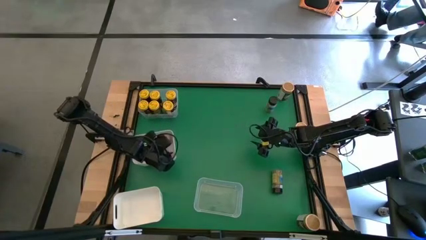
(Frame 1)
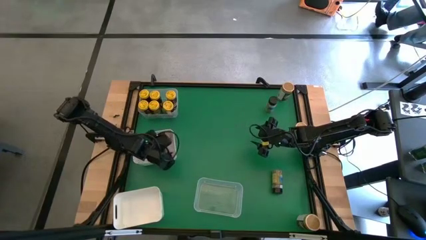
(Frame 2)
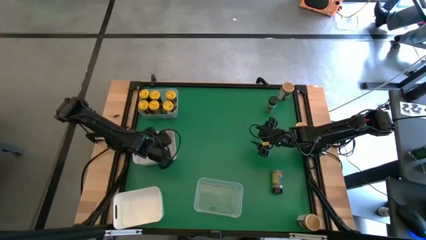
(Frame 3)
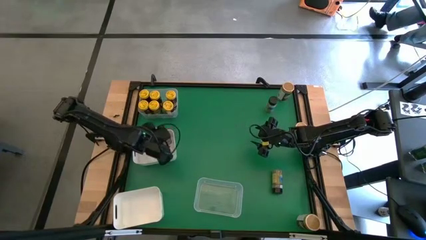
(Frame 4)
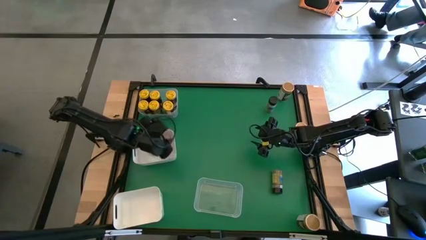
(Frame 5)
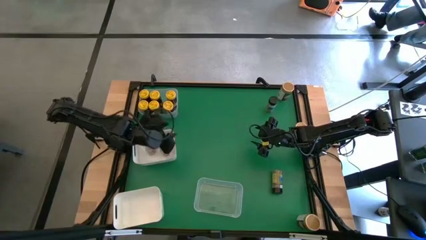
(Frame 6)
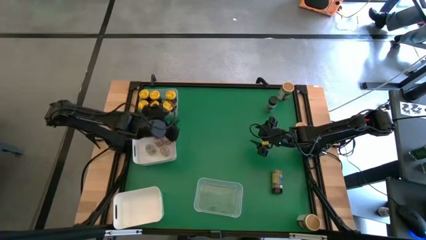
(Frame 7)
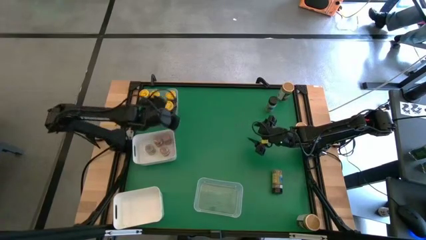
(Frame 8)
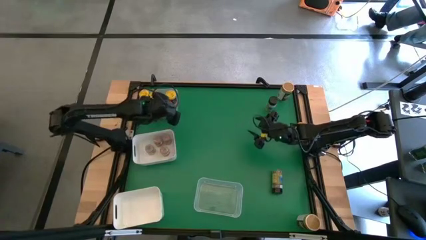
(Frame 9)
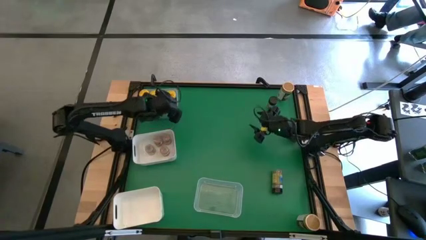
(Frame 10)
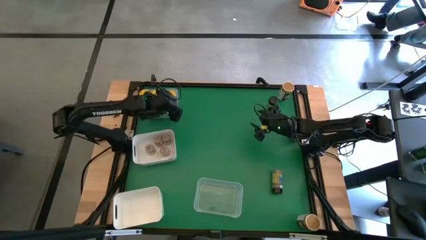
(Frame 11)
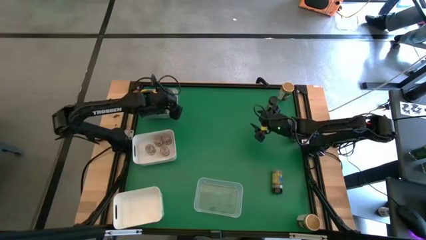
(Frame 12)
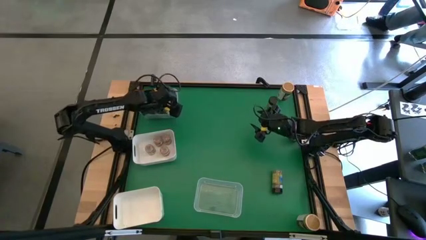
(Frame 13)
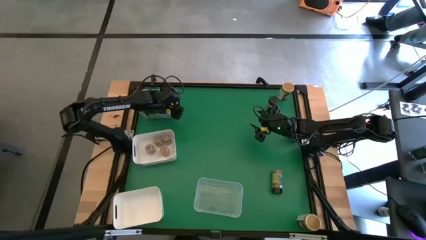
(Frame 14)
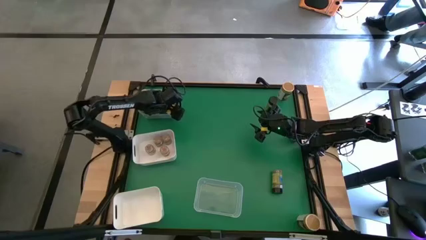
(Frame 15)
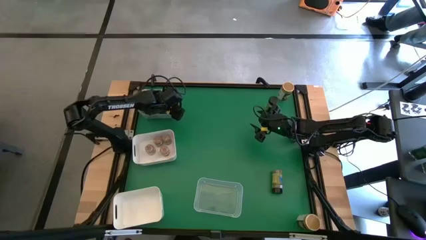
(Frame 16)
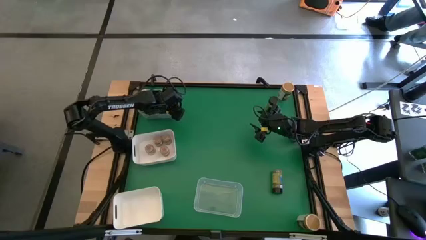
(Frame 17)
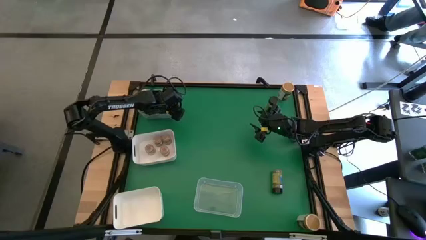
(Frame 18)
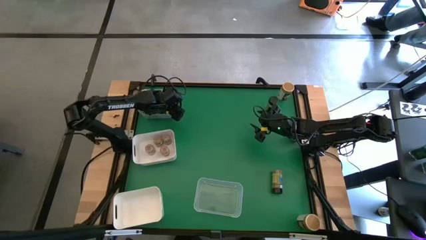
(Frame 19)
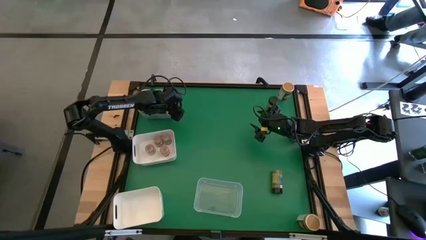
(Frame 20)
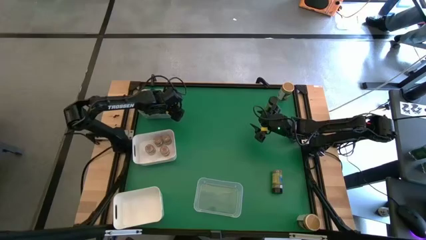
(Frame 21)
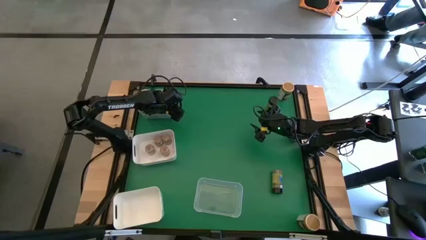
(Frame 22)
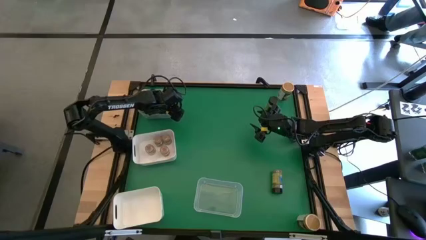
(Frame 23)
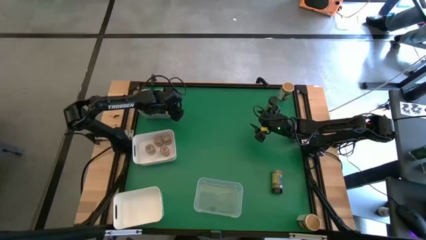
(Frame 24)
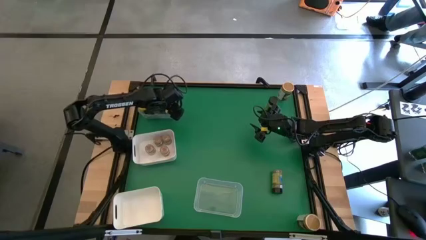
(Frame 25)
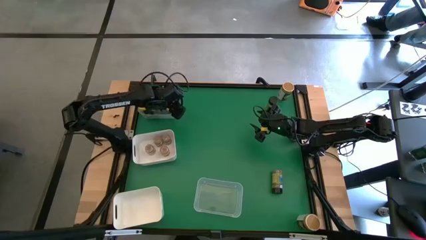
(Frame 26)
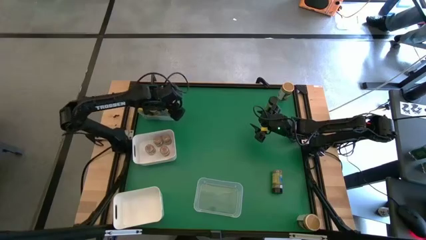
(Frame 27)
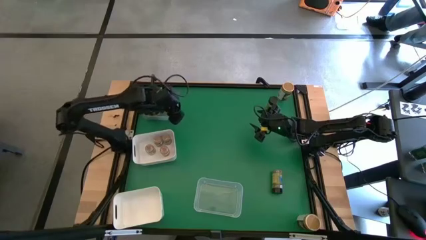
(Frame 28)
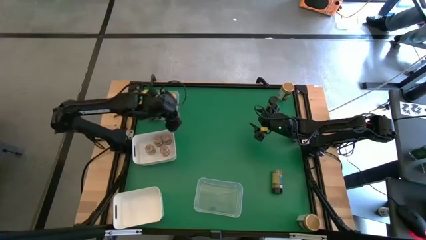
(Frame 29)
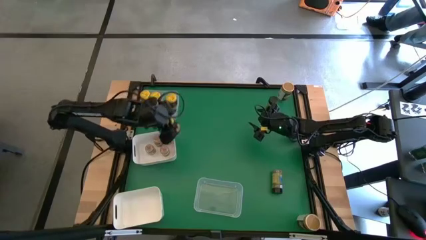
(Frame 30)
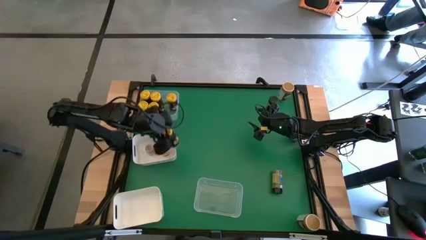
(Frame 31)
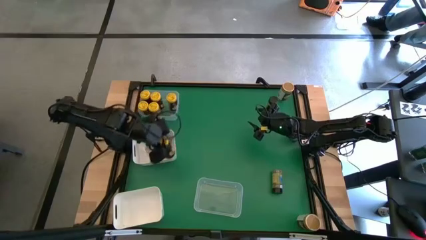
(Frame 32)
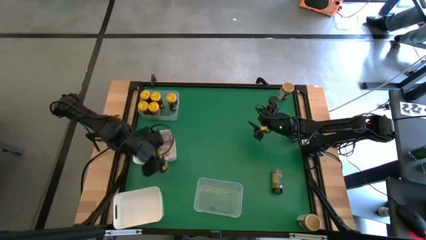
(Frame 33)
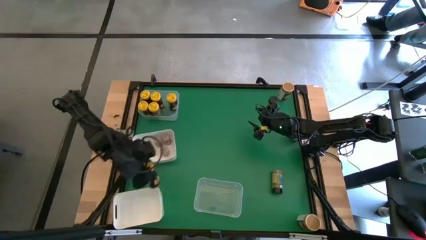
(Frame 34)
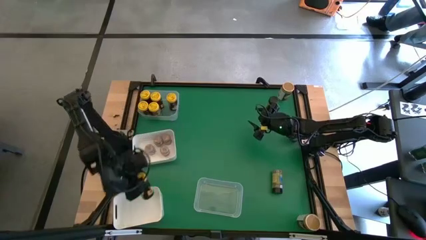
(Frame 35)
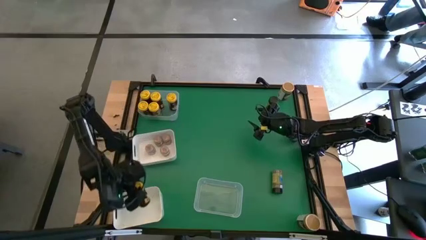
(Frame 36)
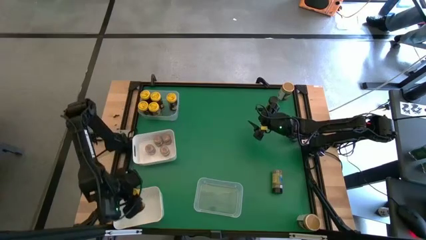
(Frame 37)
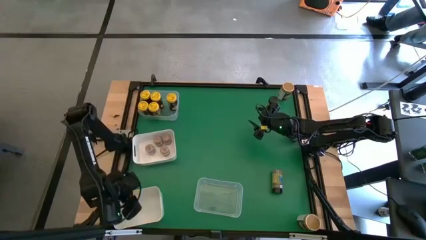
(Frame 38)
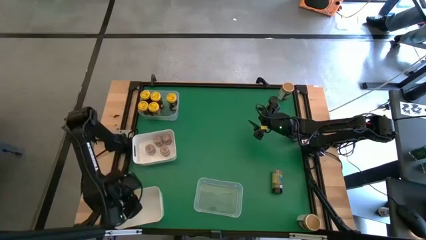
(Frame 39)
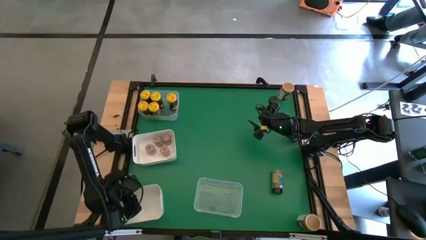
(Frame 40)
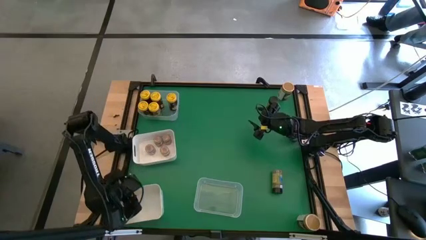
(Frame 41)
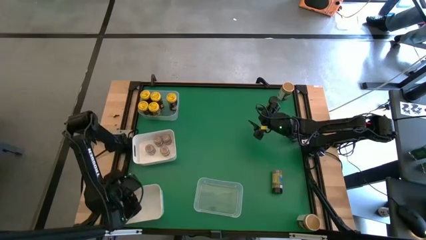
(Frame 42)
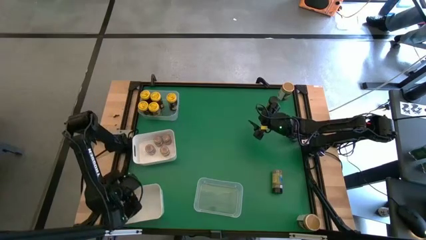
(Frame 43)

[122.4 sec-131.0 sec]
Task: Sort spices by type
Put the yellow spice bottle from the top transparent bin into the bottom white bin

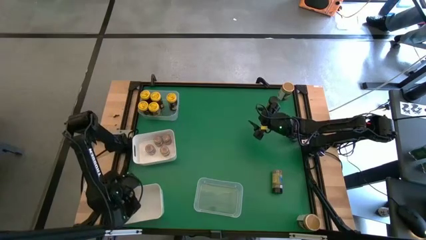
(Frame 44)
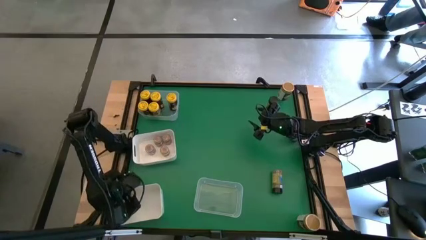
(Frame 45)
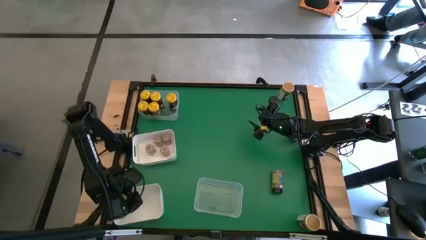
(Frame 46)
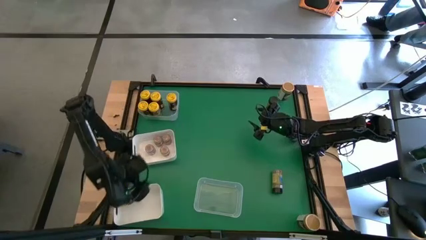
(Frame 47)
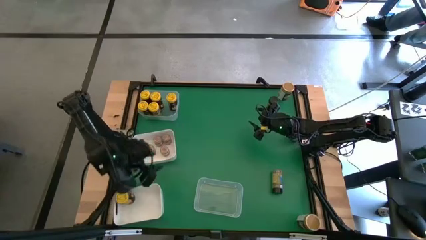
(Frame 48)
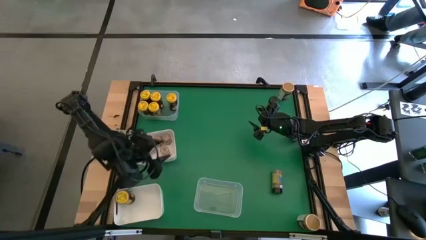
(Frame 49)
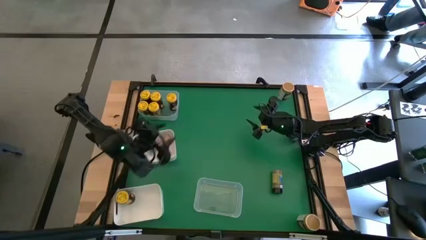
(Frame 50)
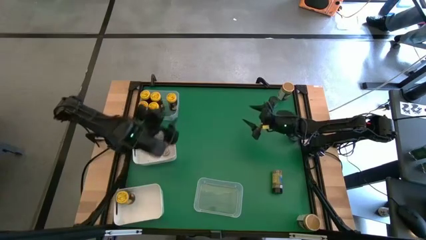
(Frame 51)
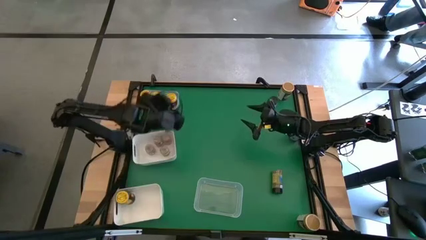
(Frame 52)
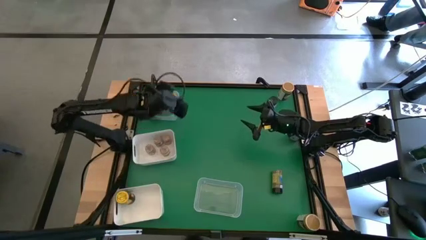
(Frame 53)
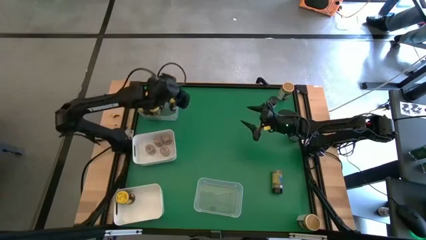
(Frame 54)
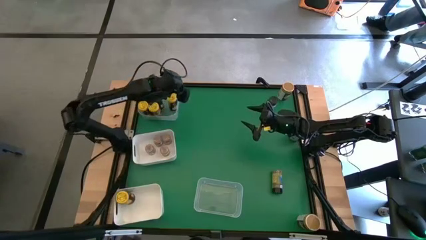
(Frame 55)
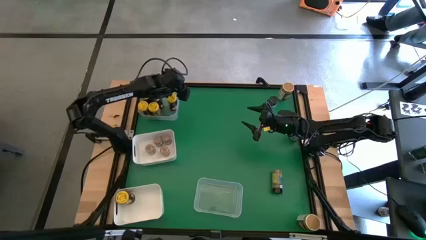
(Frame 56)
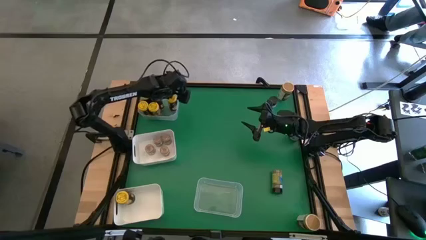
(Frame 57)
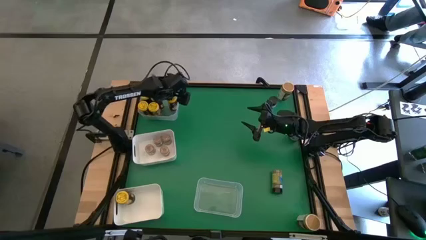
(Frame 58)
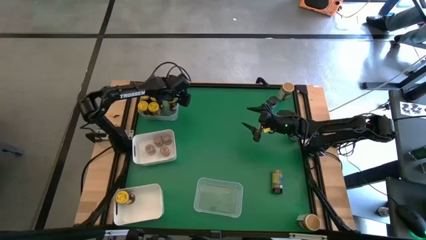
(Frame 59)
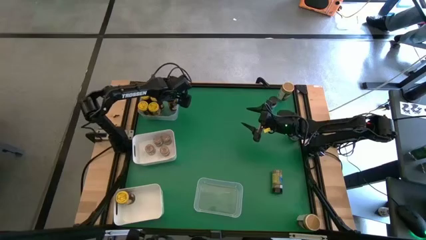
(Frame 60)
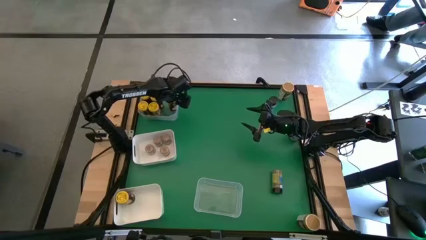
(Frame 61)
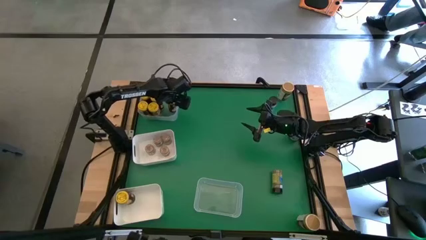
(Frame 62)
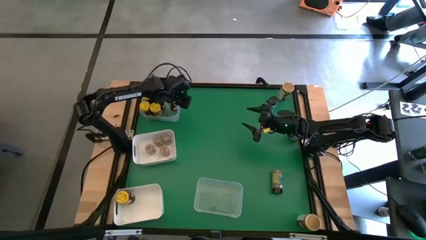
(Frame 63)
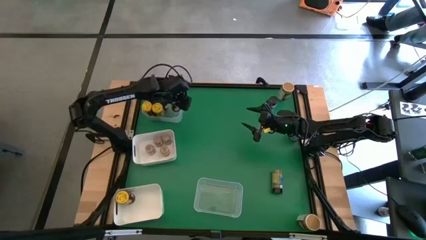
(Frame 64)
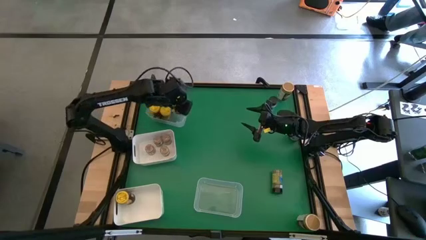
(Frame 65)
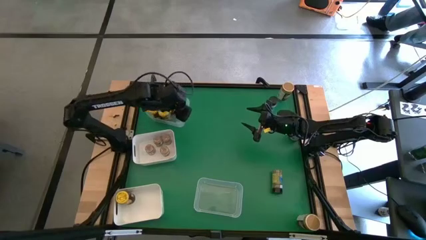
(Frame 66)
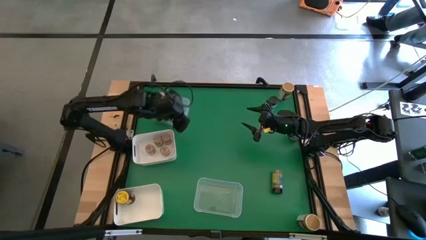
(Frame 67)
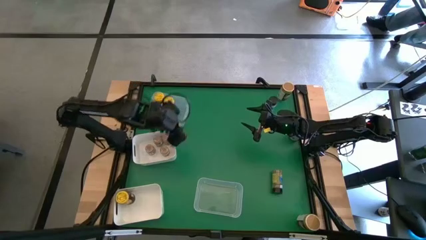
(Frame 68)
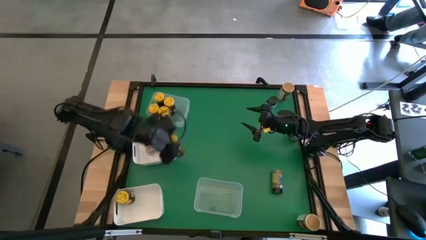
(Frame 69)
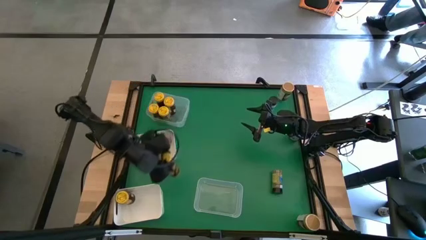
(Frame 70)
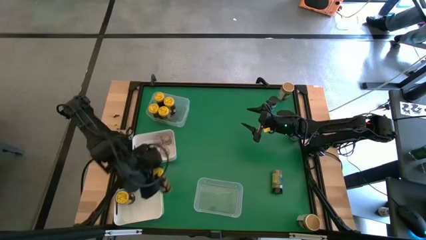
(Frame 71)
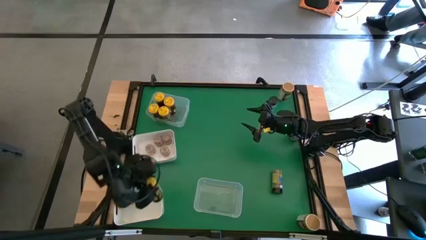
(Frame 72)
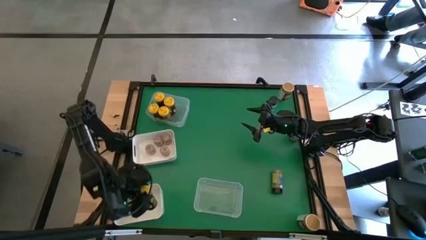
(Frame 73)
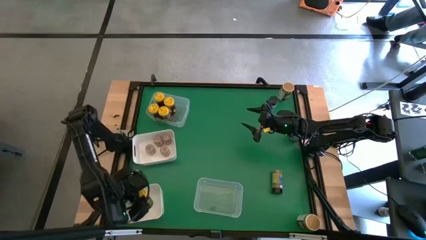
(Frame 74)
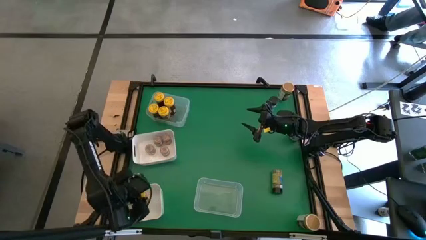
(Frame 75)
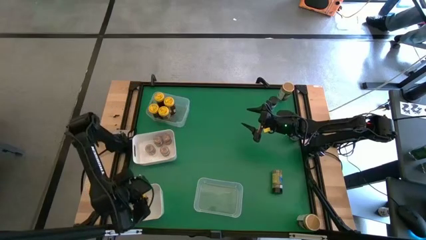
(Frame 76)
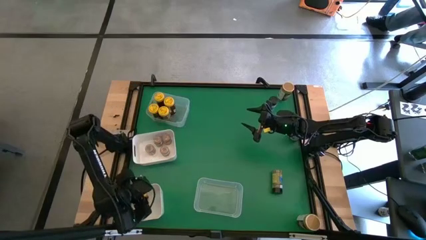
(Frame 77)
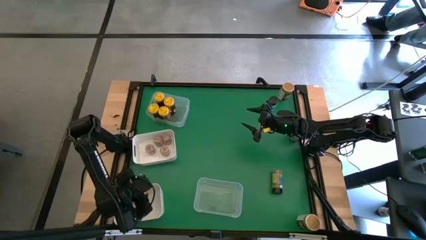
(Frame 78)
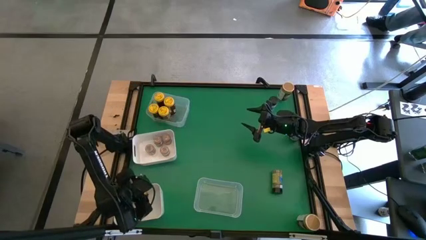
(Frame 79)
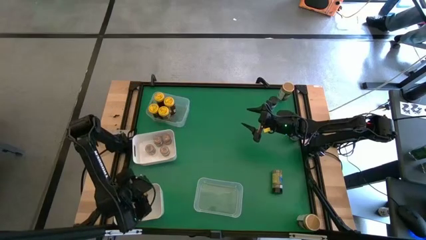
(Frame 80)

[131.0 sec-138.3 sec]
Put the yellow spice bottle from the top transparent bin into the bottom white bin

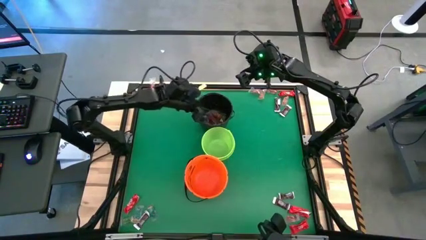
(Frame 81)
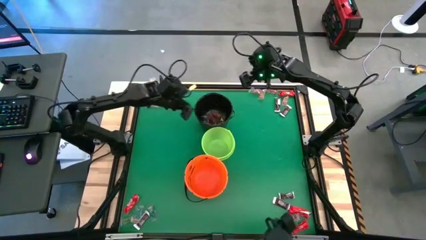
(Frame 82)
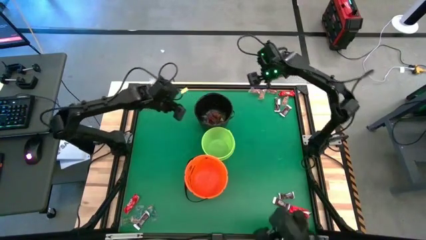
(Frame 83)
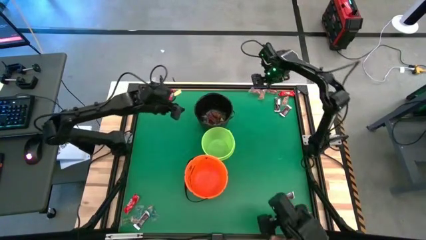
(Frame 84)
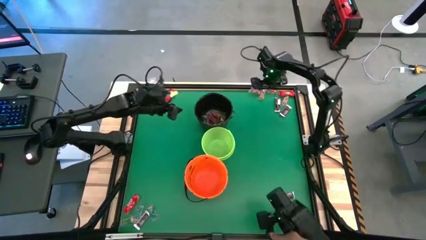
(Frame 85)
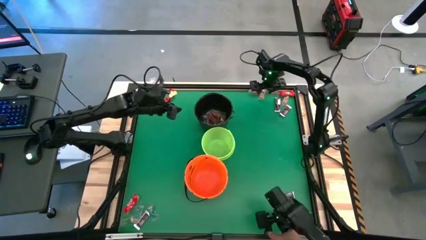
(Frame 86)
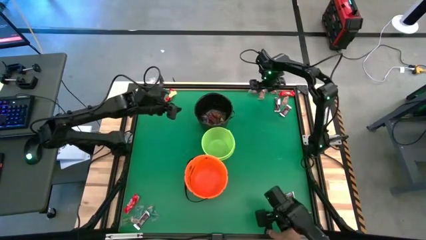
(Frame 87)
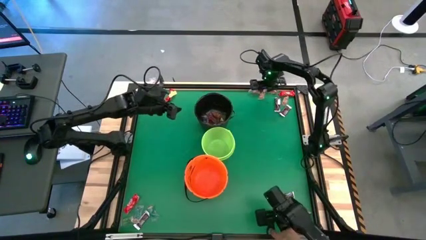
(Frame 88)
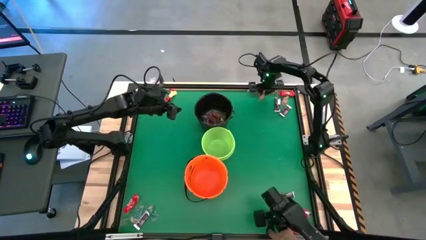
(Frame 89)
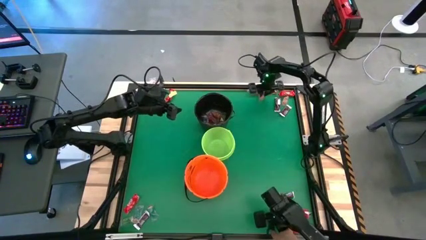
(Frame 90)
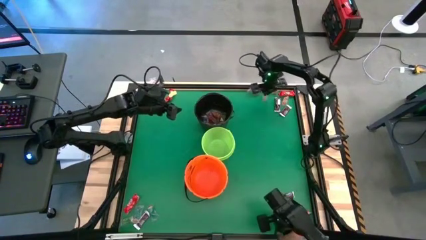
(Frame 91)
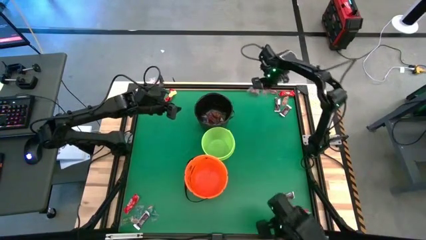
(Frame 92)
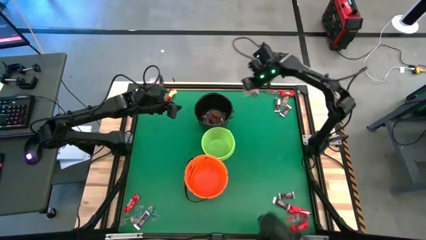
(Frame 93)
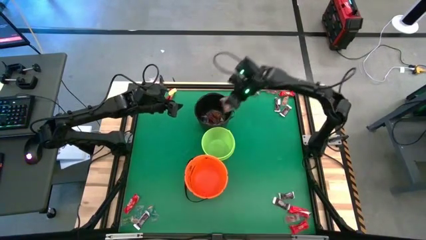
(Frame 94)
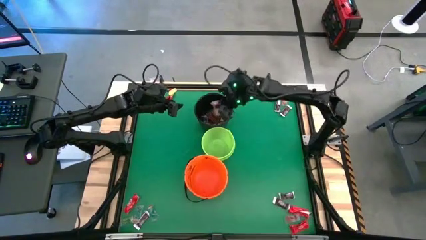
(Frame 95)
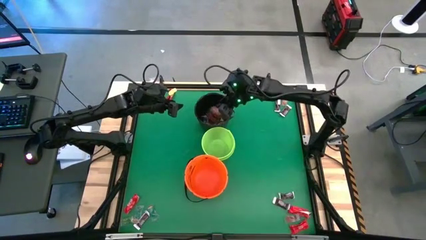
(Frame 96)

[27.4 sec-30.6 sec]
Task: Sort candy by brand, put in halloween buckets
Put the orange gummy into the black bucket
